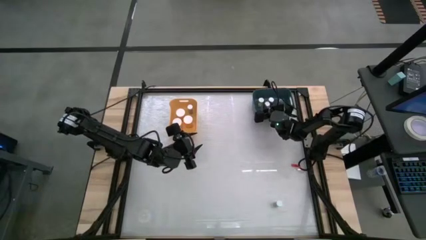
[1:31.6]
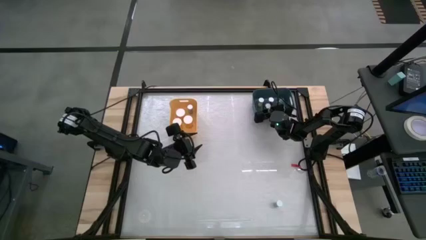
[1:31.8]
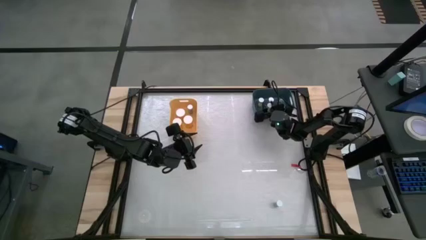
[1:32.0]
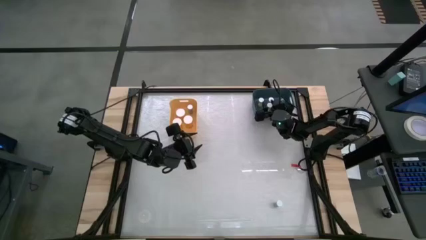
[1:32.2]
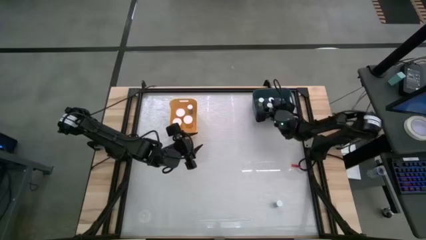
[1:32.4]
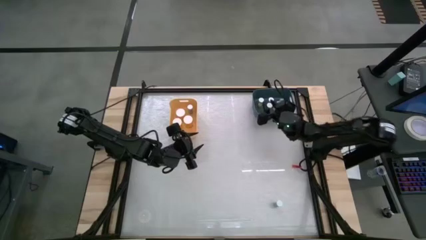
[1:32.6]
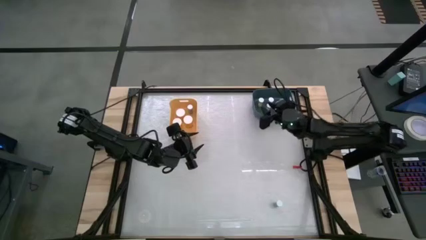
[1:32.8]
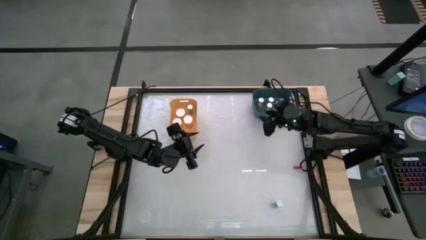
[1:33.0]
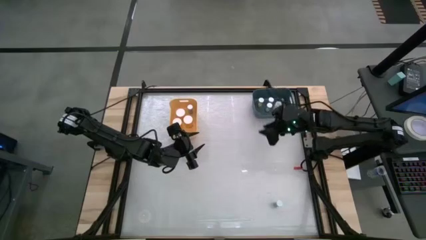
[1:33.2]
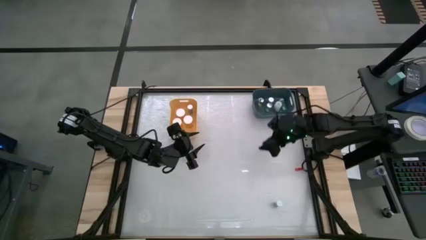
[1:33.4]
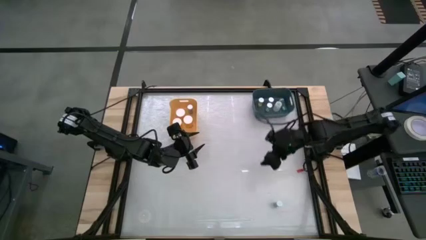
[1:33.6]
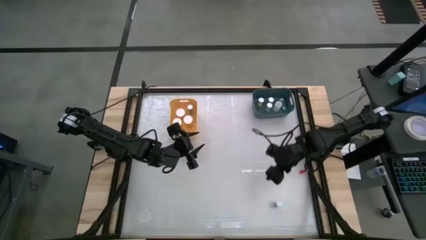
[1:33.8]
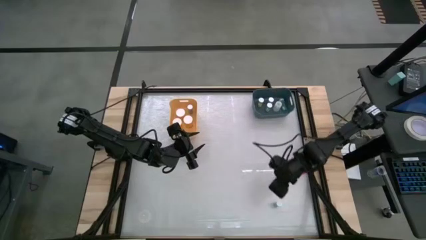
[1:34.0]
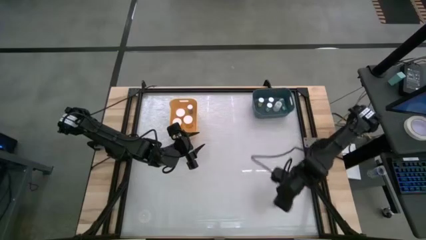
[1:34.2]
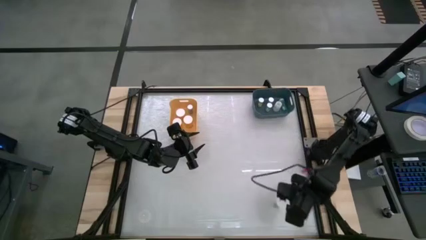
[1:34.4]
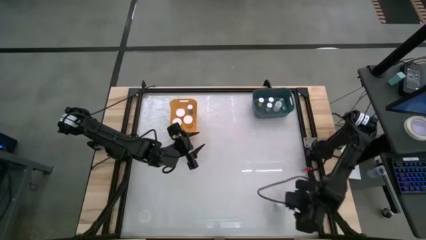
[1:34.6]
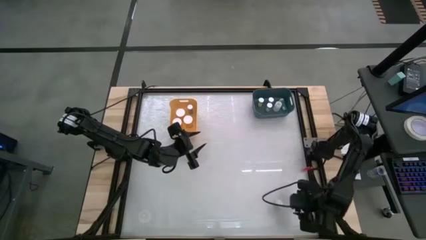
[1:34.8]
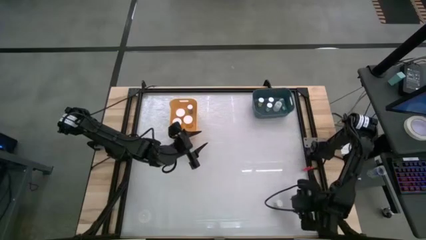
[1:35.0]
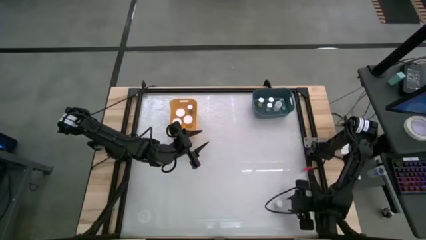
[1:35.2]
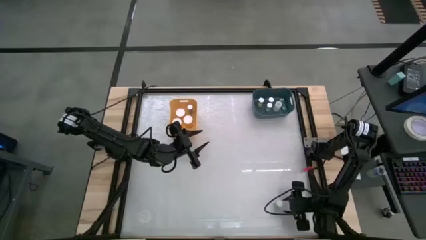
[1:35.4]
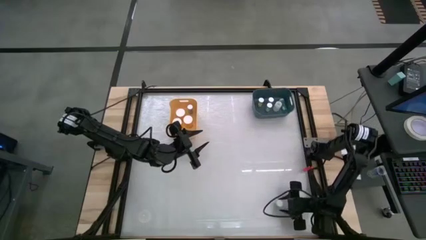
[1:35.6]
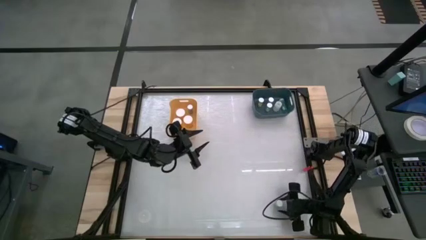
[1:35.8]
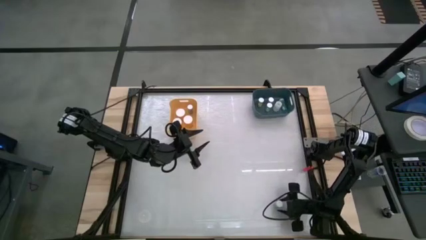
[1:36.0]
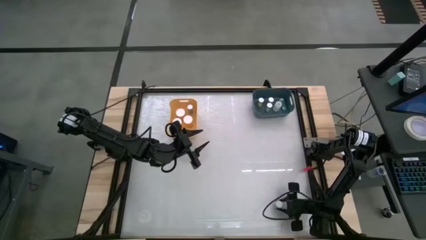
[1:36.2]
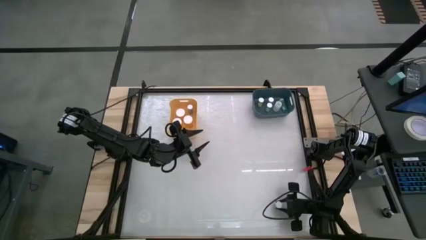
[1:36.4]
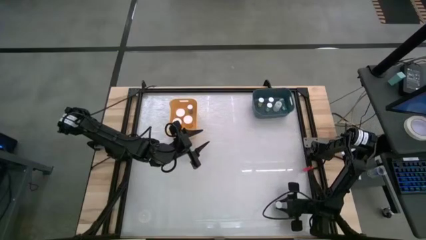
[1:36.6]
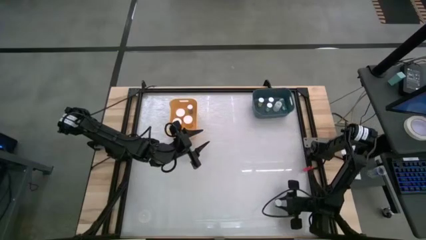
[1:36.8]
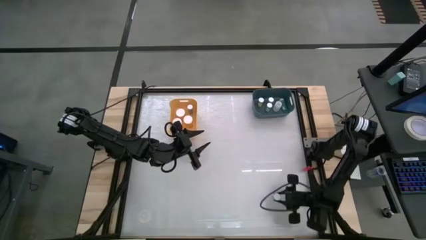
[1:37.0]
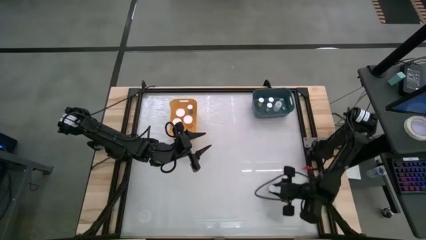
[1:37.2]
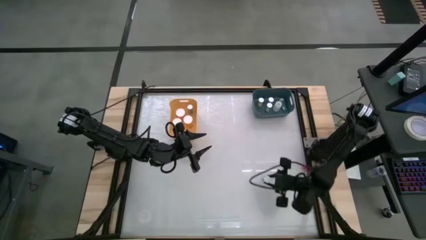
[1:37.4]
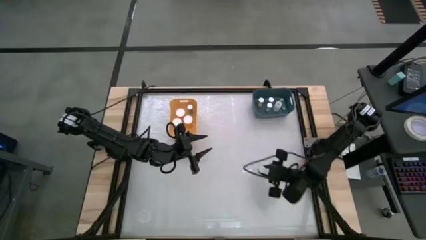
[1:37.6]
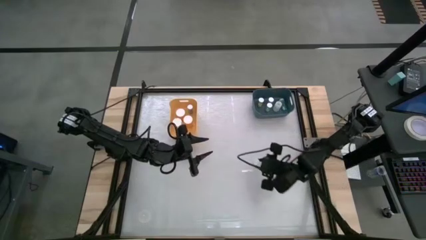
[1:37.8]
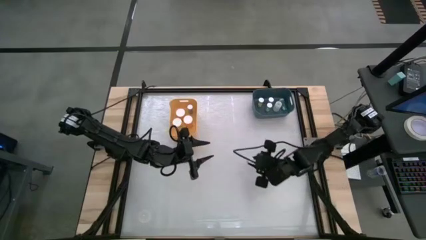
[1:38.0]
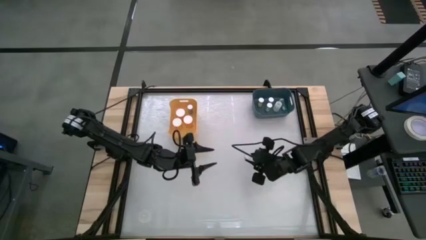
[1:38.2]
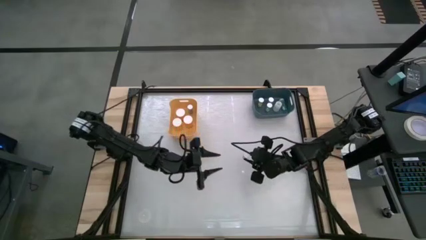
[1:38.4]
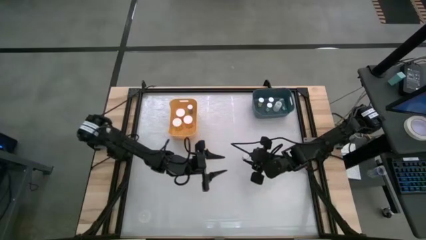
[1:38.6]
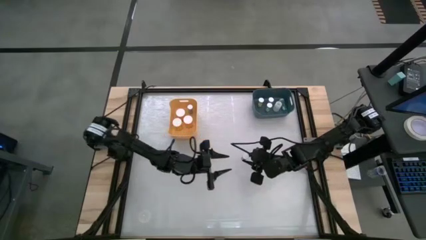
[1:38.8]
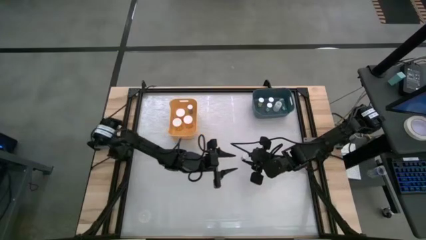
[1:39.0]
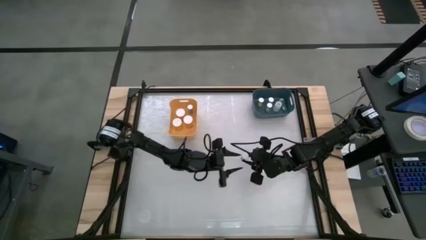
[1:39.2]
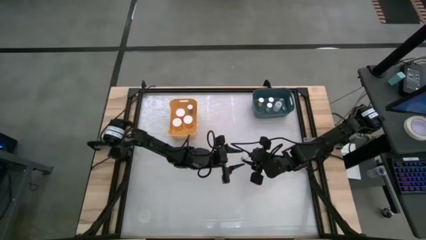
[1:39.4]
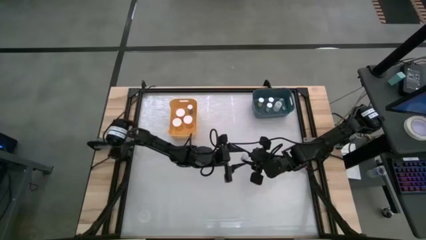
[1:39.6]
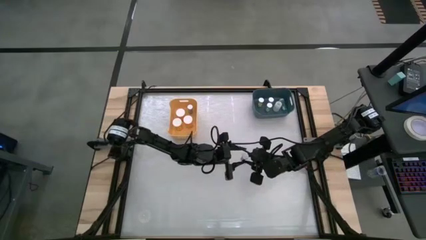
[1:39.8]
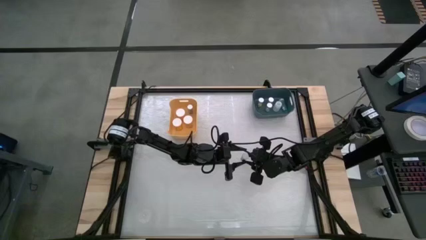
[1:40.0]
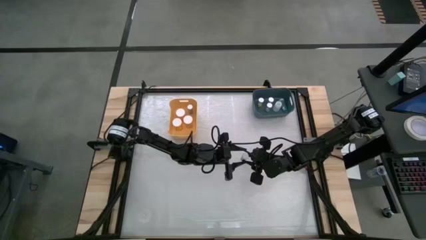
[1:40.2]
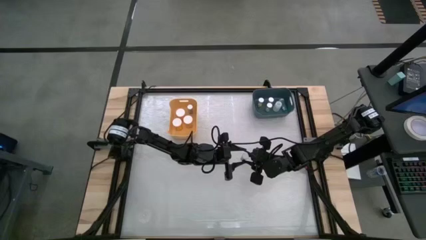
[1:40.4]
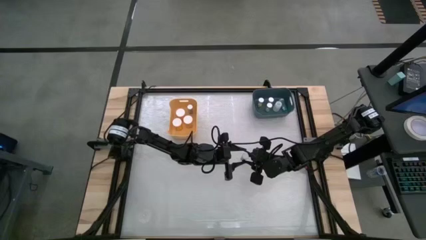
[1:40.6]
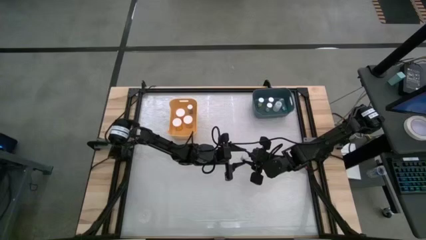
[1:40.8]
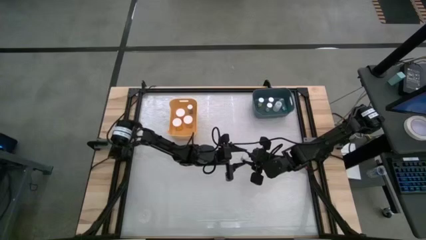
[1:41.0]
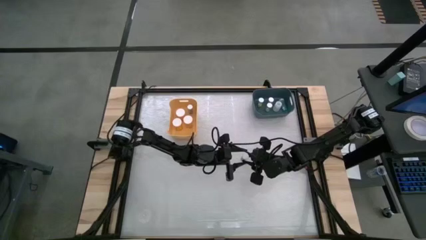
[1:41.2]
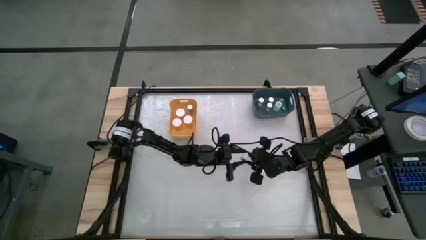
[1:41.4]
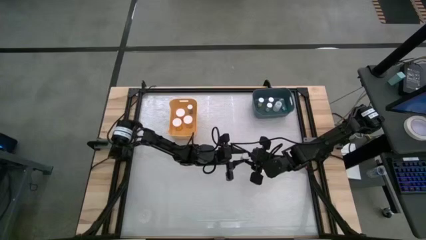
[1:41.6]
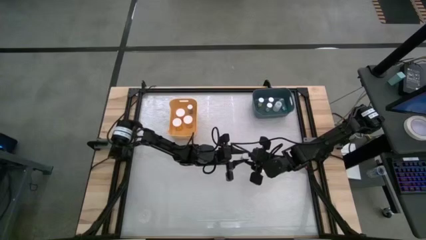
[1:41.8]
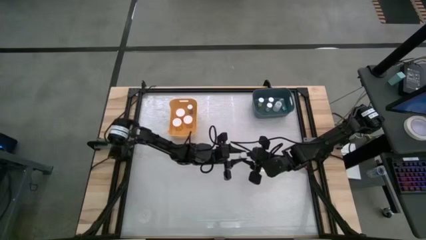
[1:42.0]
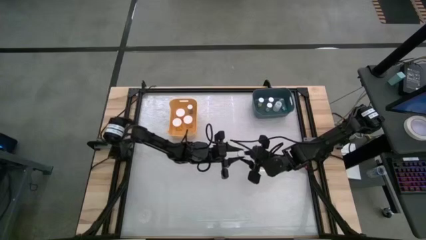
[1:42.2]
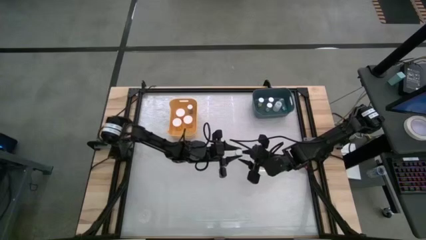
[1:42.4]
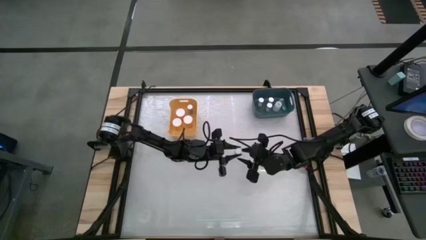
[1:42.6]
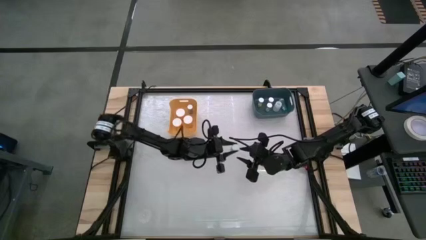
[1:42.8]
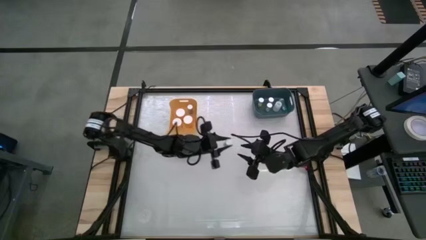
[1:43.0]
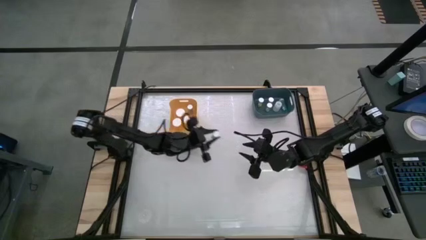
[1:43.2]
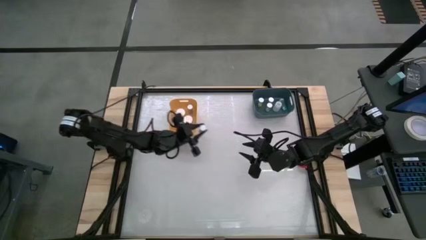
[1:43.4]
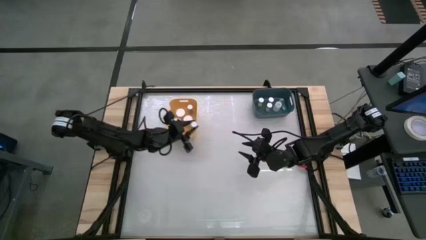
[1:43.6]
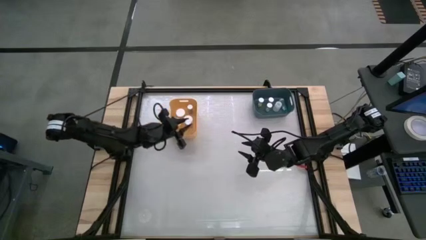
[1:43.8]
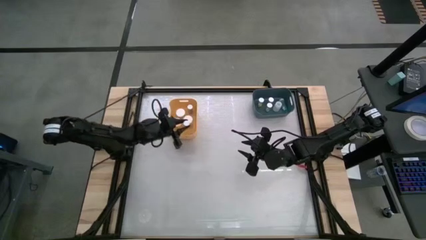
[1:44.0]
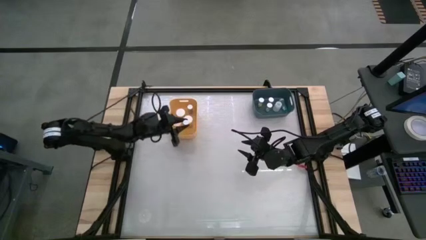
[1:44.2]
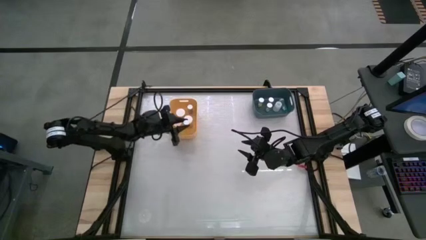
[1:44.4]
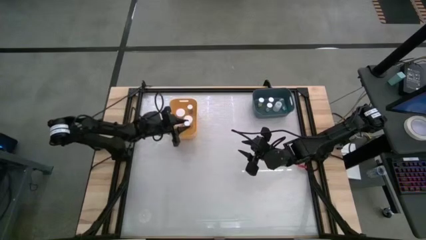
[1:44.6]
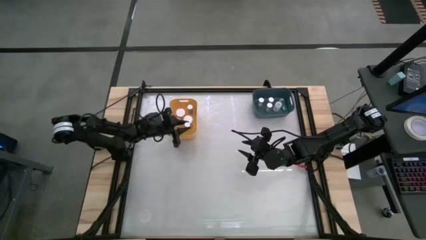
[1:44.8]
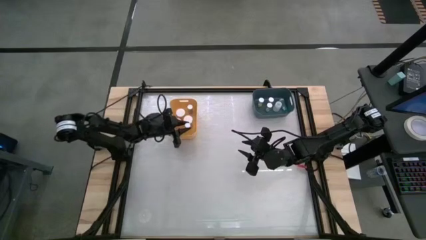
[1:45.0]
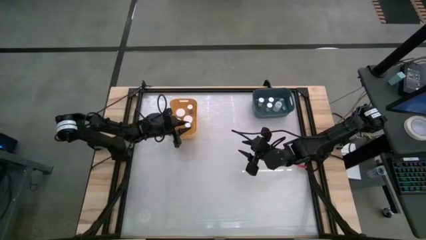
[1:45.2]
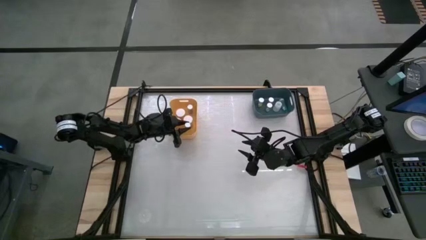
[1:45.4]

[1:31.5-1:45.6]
Task: Pick and place medicine bottles into bin by pill shape (circle, oval)
Put the white bottle pill into the blue bin
